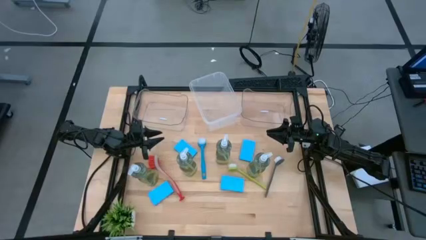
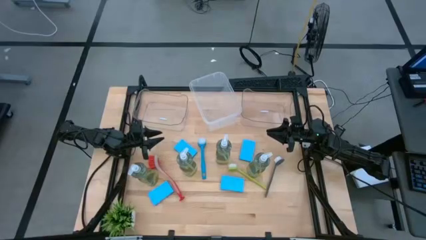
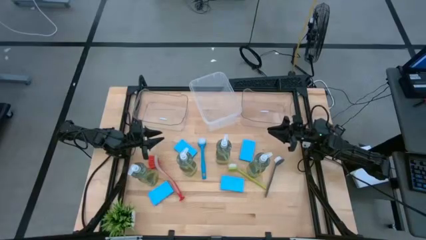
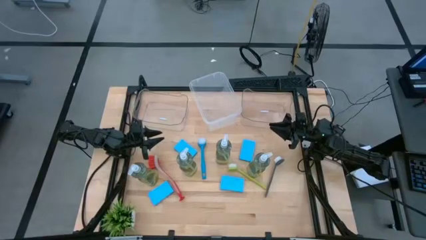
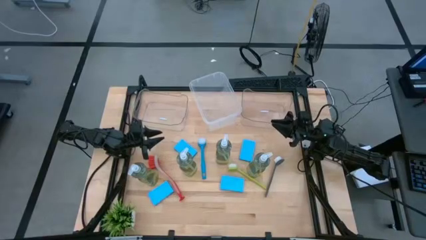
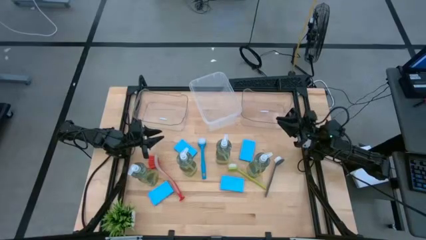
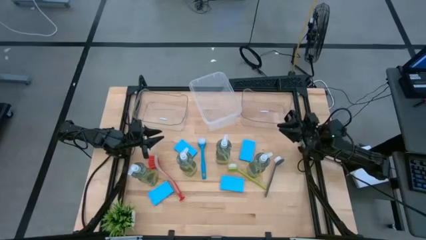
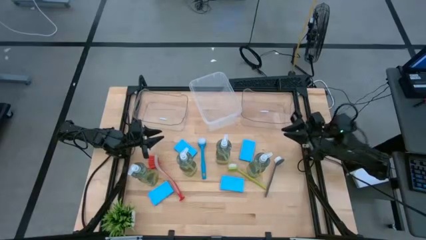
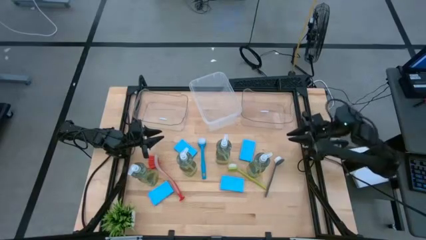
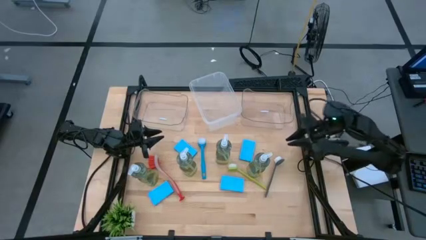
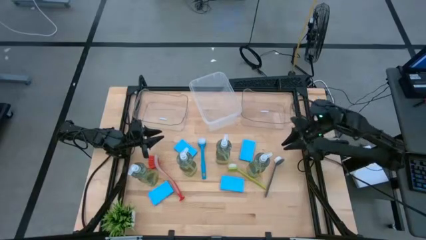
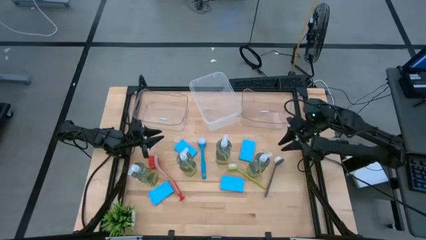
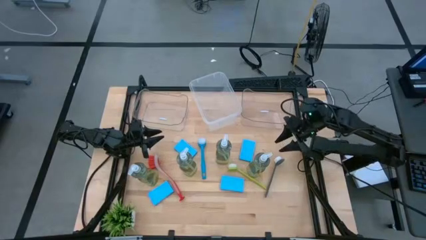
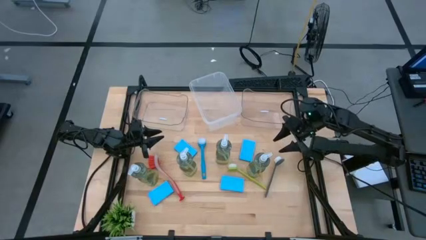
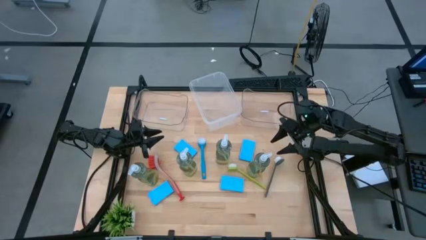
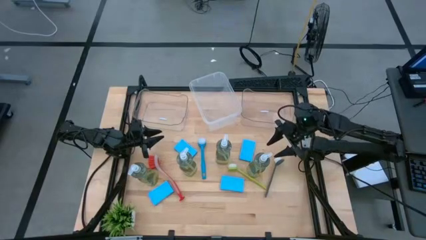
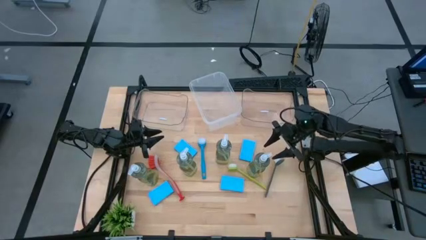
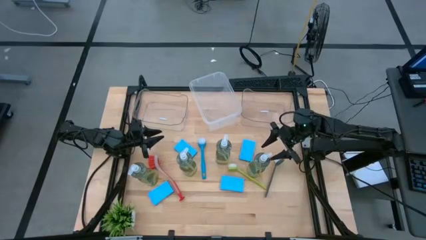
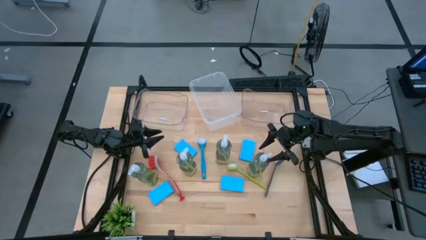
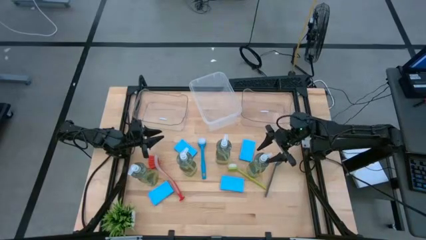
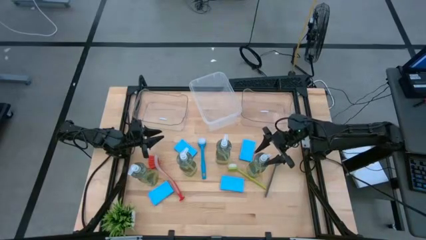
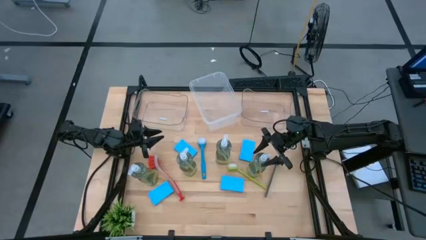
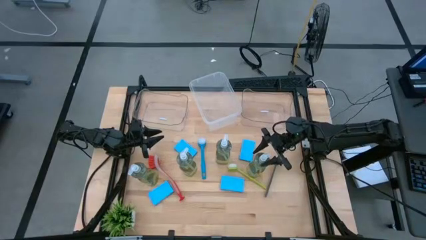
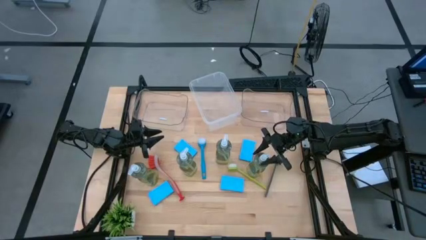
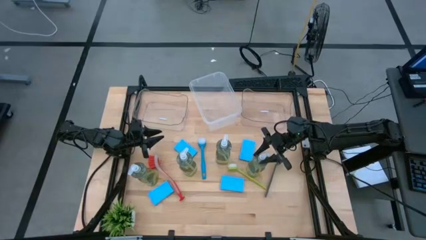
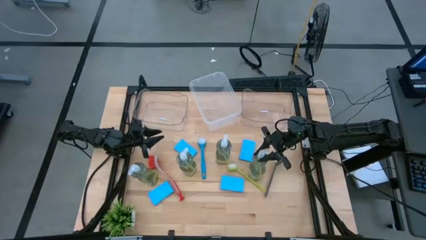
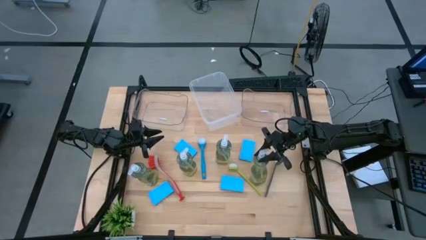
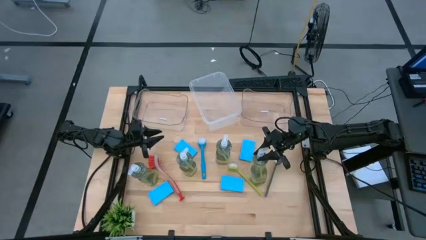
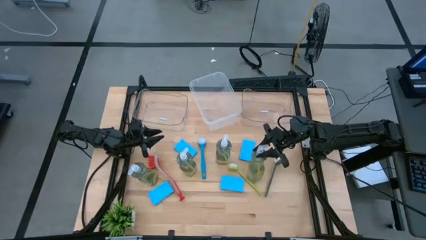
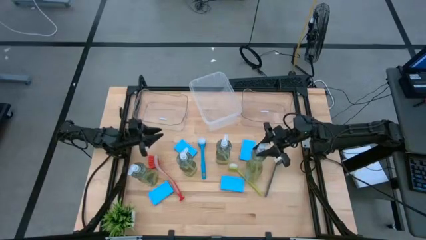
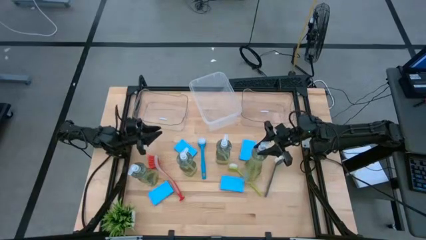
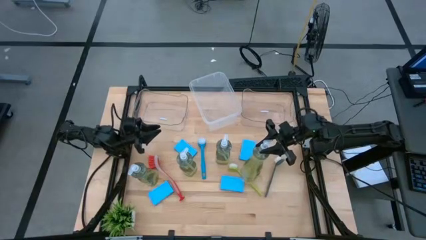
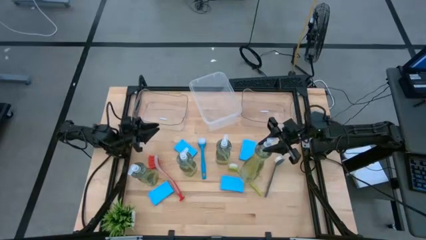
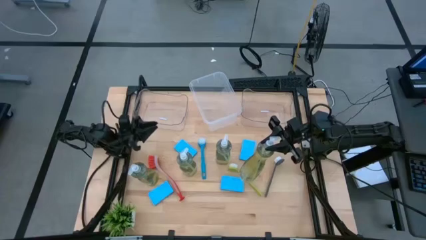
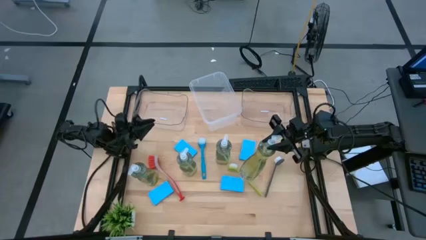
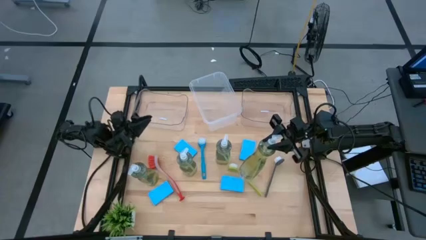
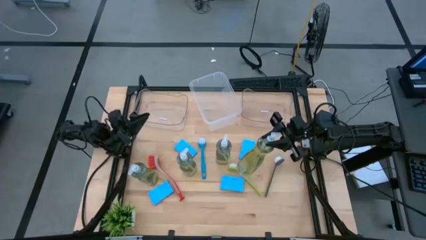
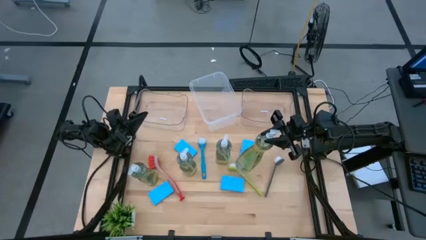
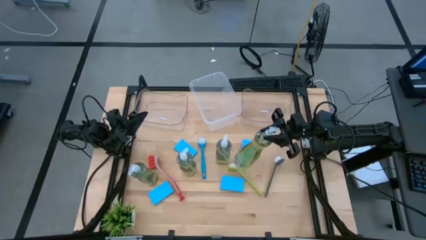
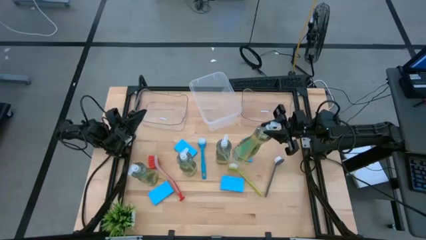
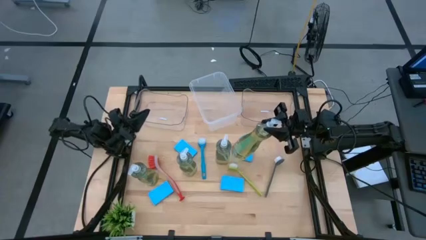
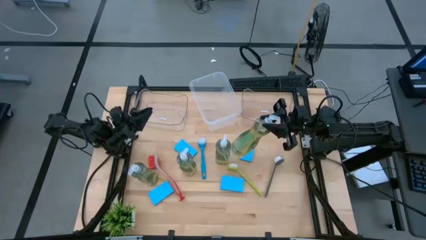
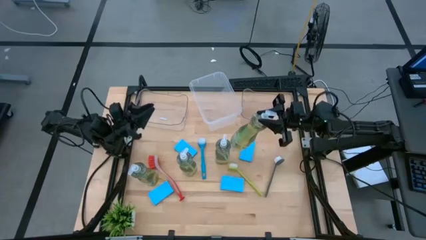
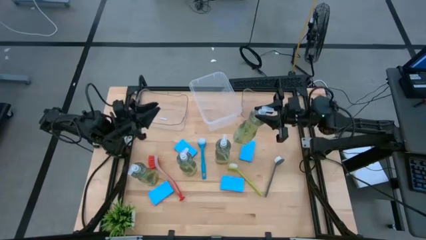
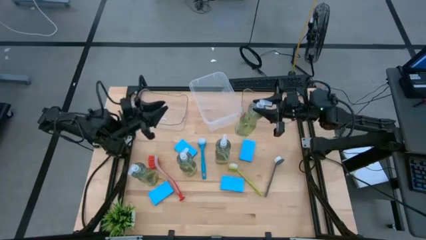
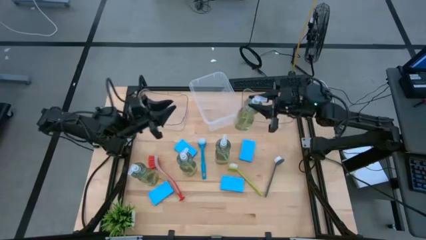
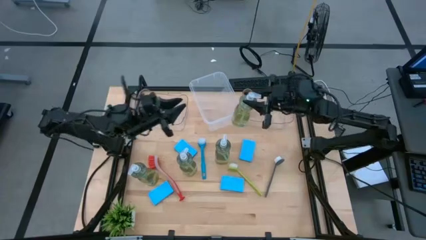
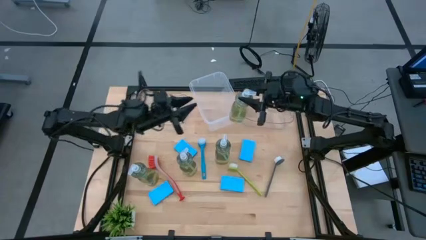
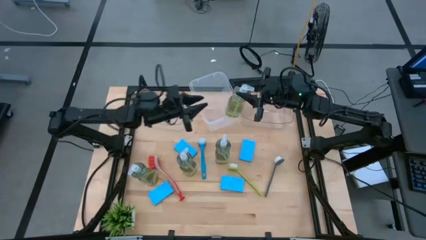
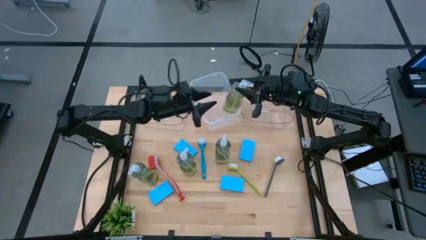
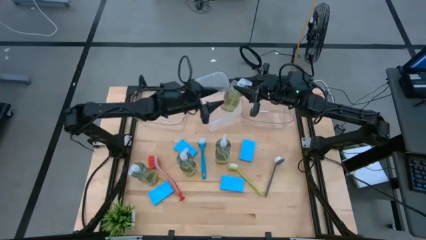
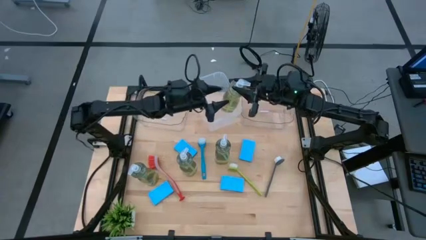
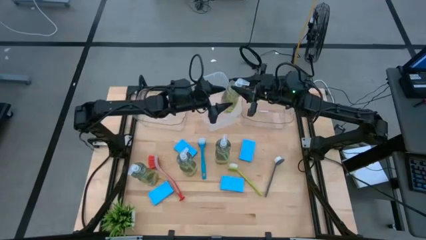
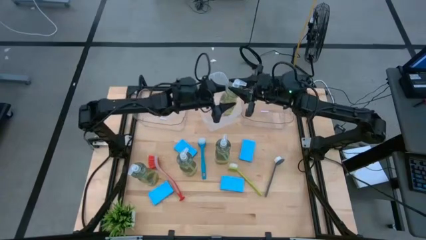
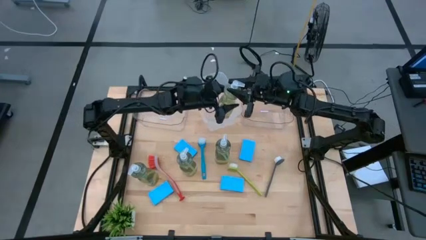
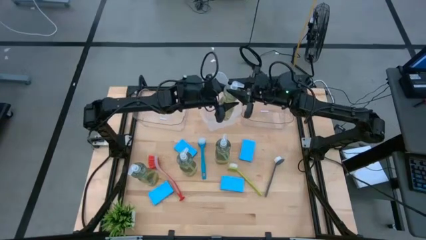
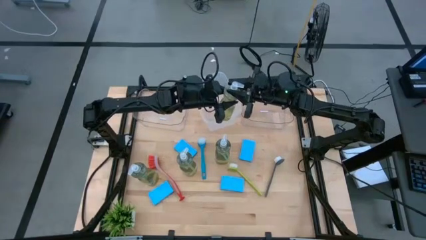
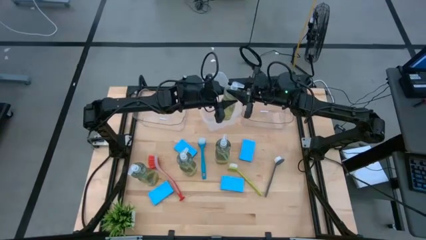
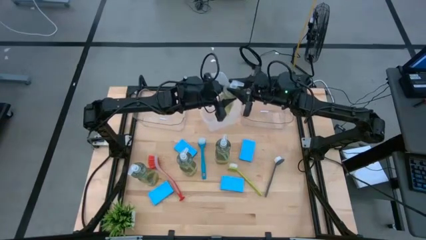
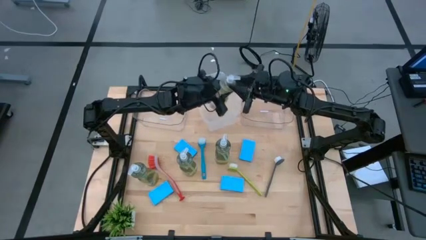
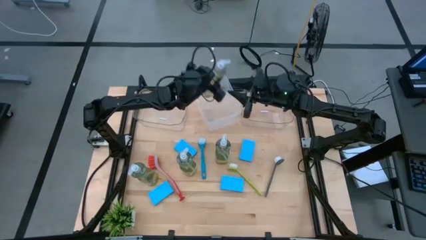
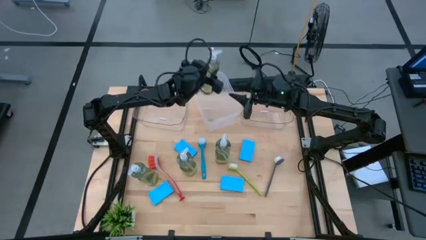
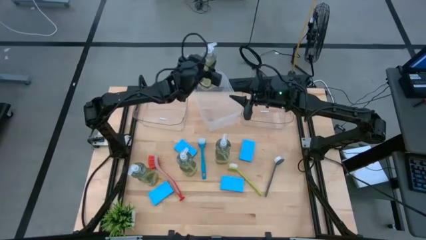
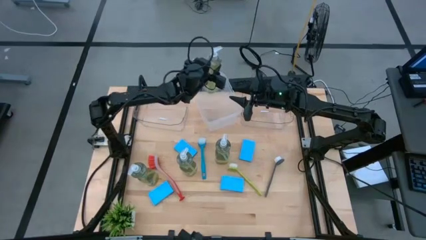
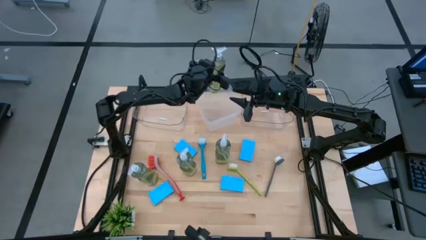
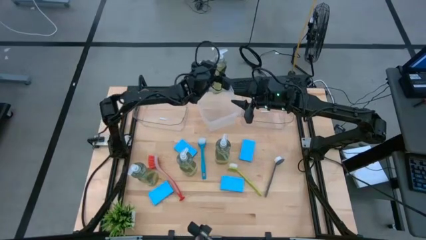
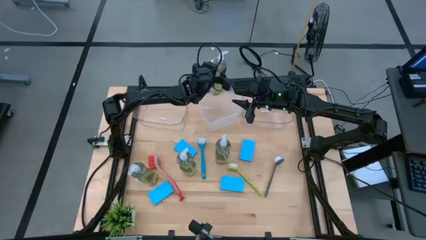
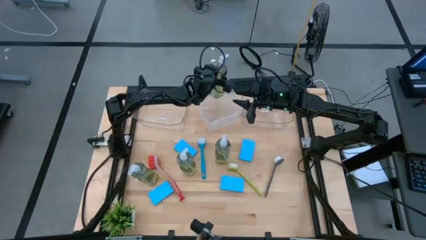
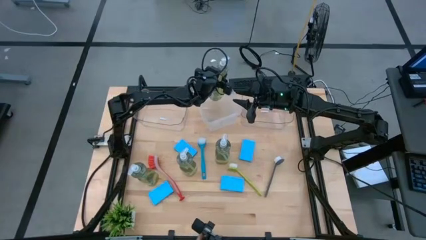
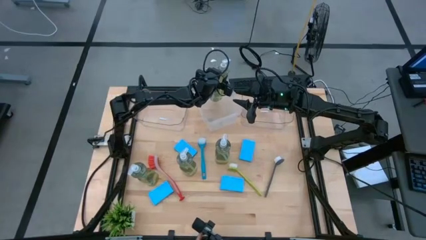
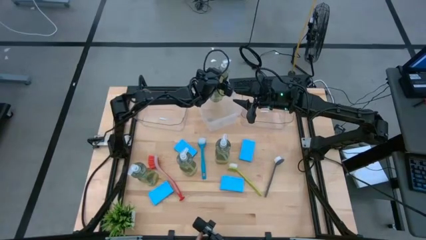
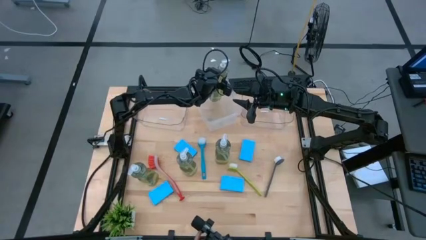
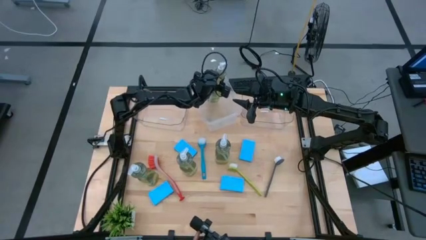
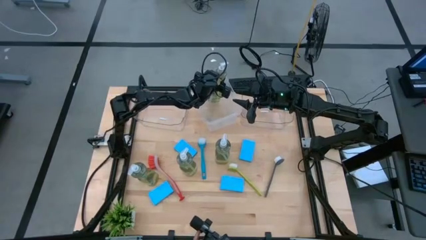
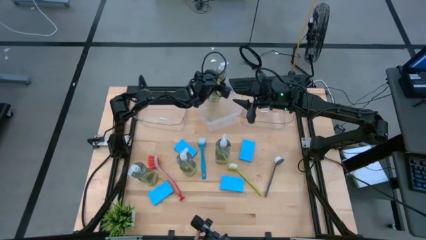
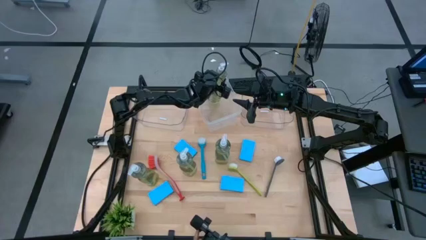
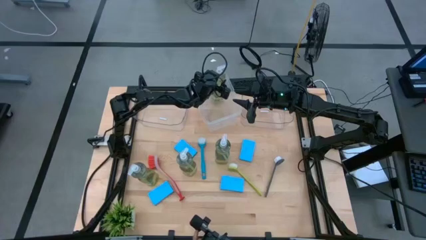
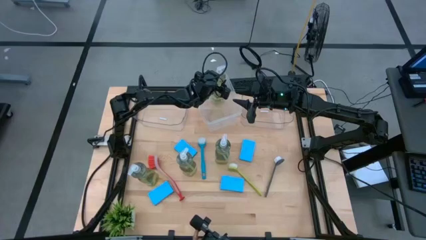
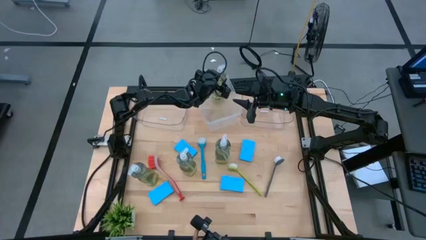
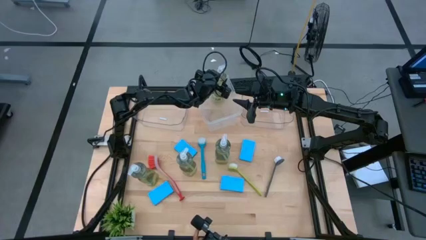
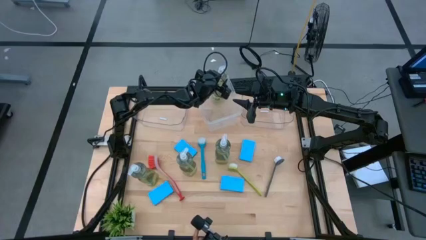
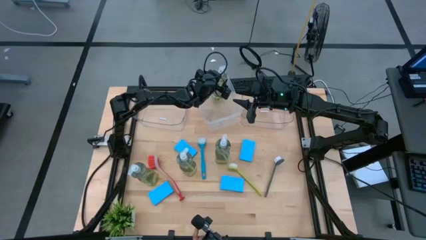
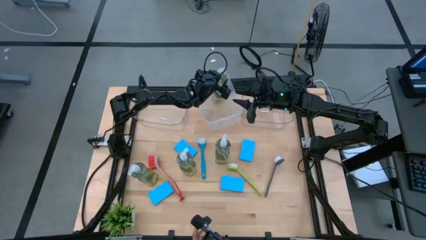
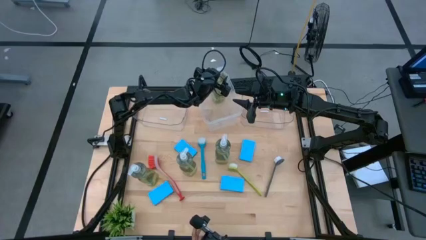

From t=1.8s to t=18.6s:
Task: Pick & Place Kitchen Sink Supplies
Put the yellow soap dispenser into the white bin
